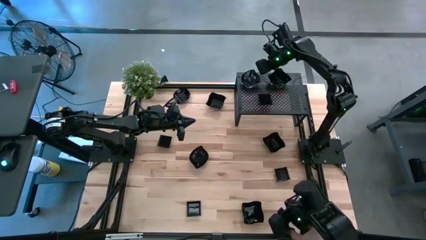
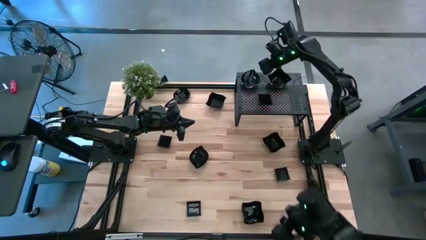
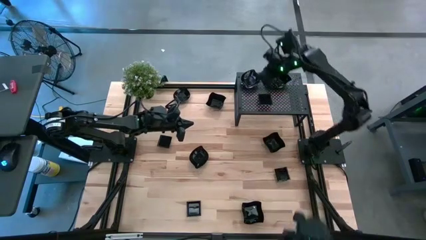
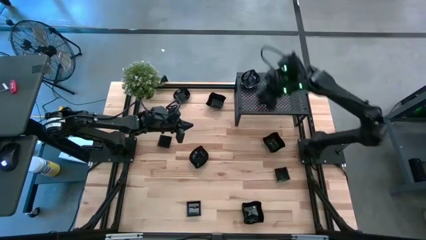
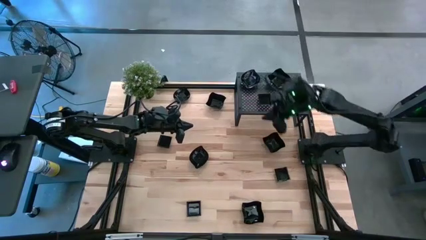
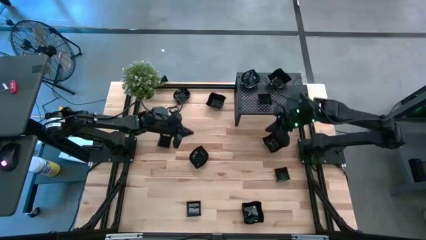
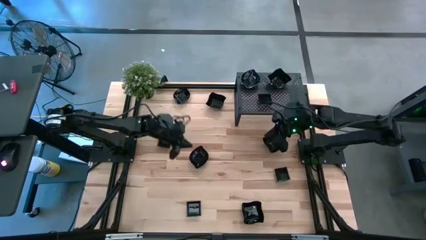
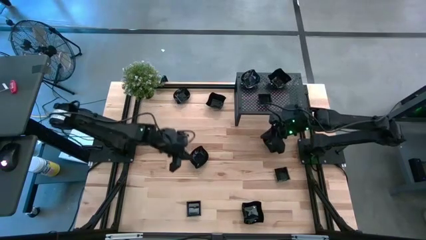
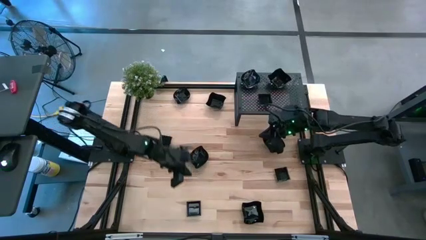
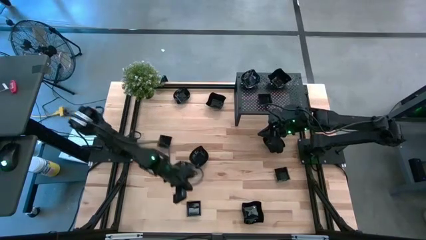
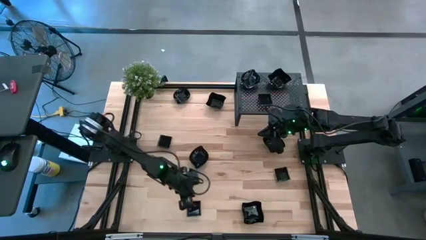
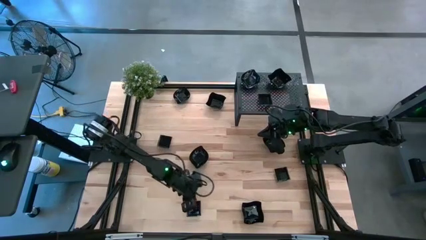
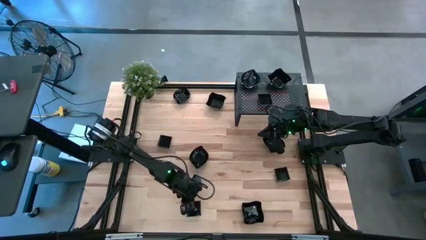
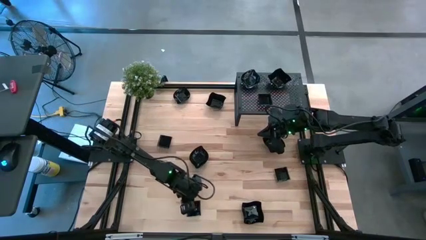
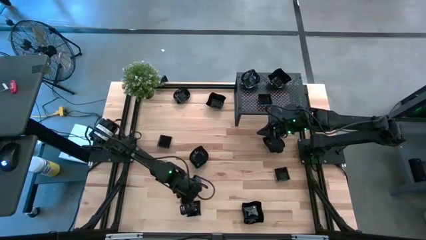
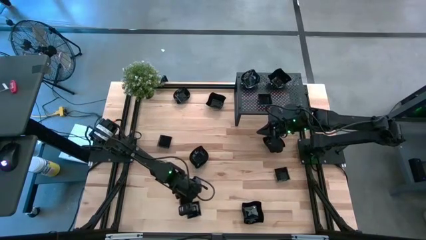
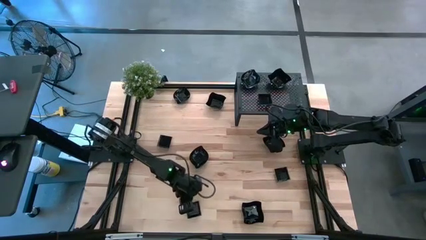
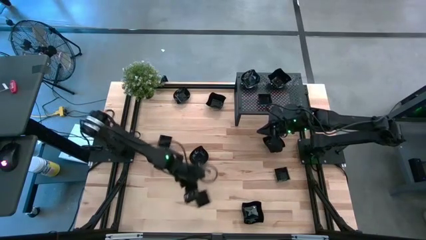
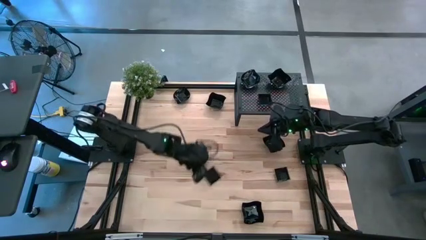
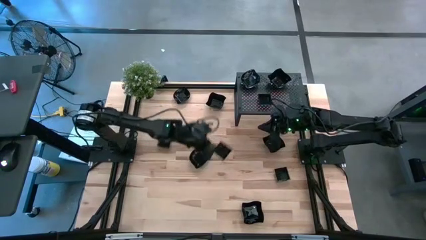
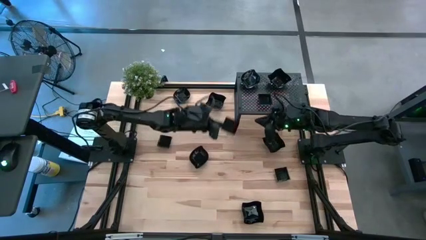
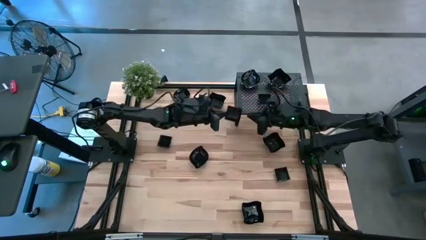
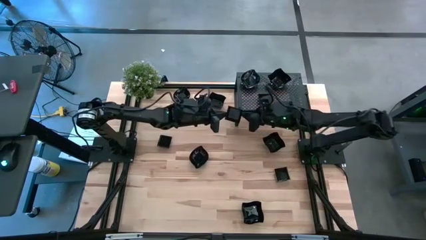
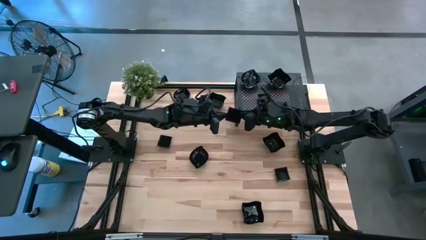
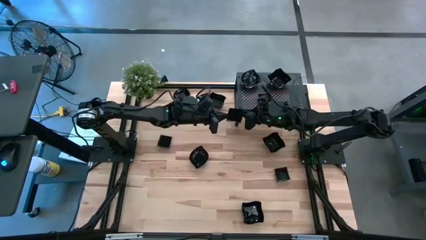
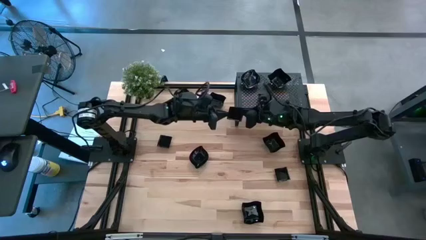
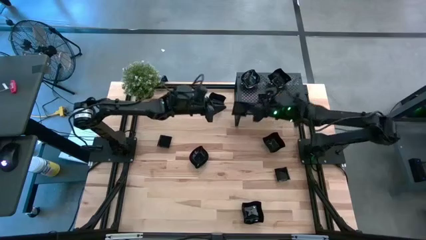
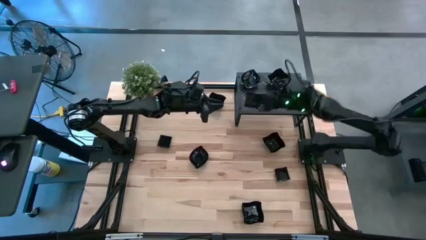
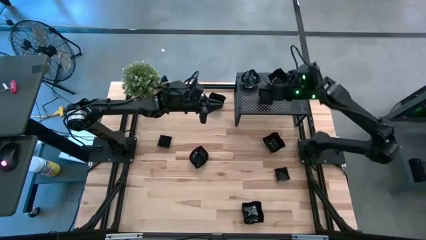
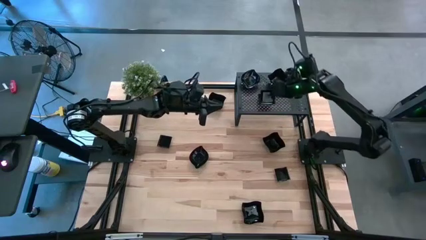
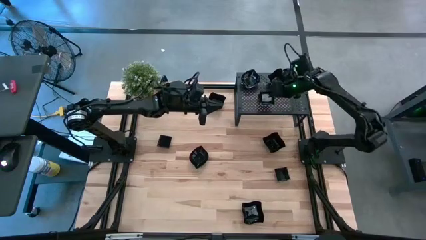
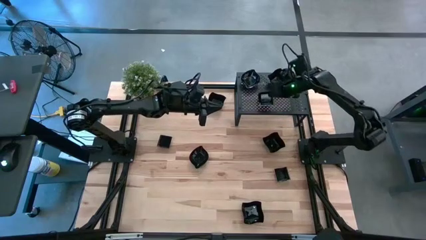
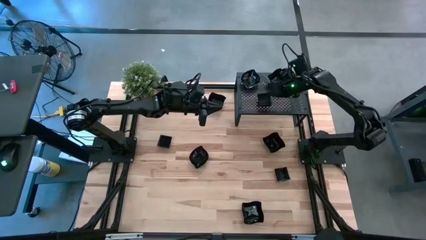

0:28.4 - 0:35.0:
Task: Pick & Place Mini shaped plates
Stack the black square plate on top of the black square plate on the shelf

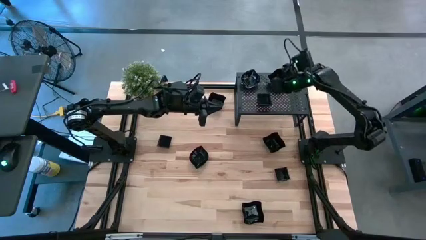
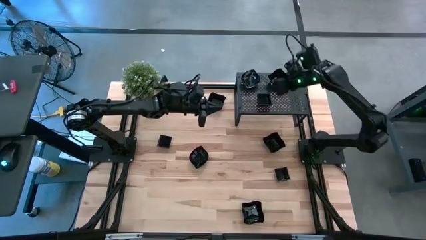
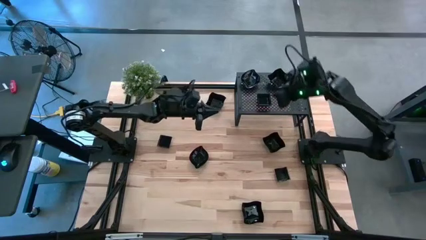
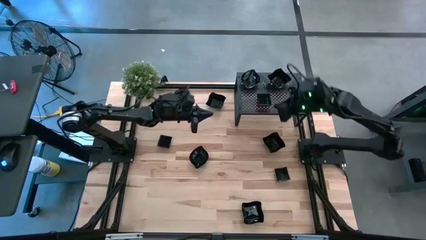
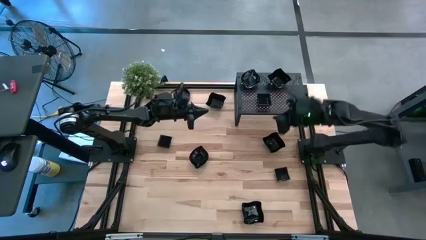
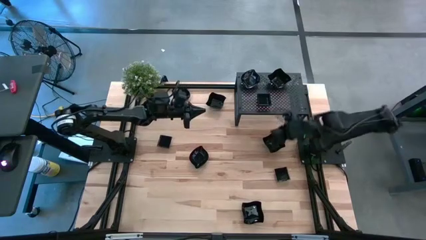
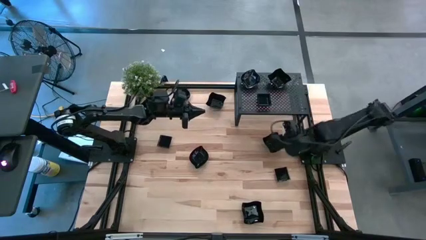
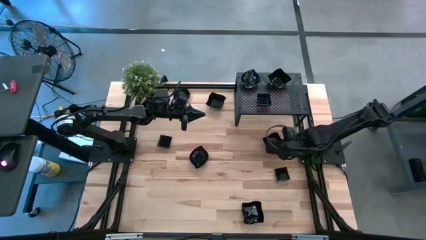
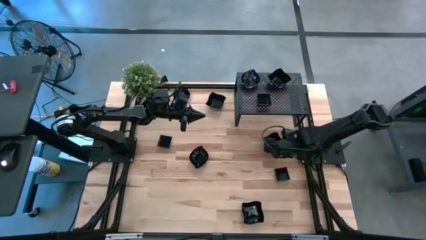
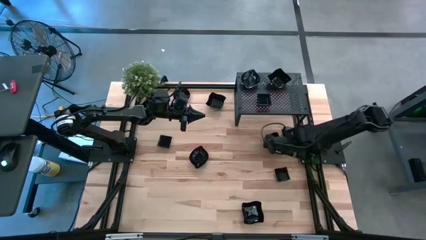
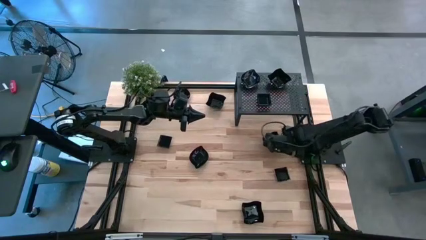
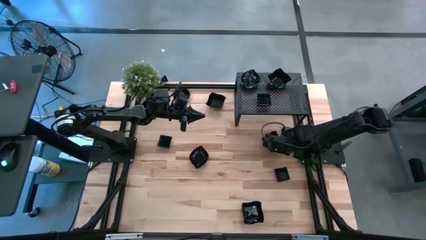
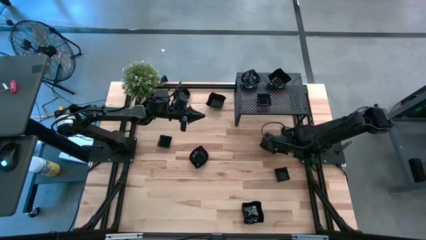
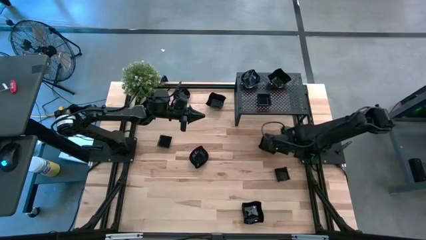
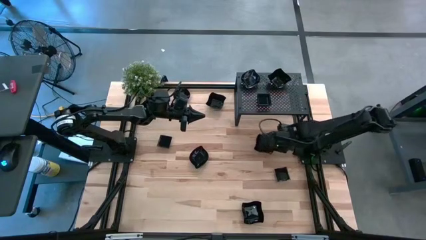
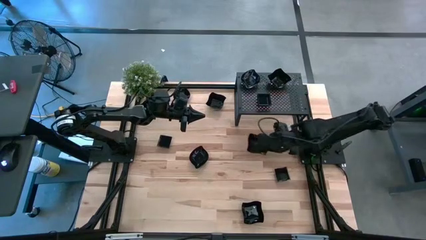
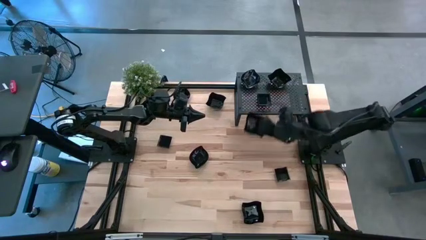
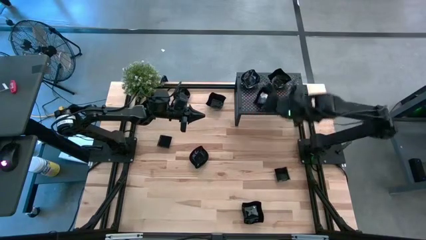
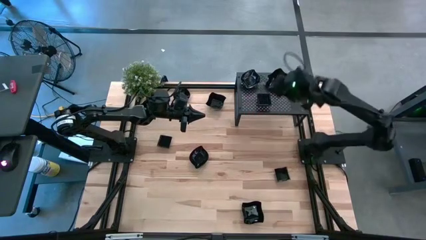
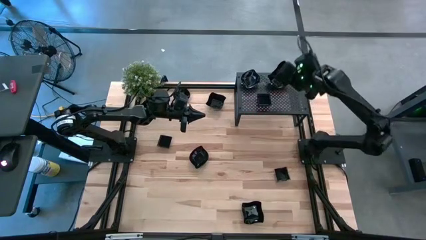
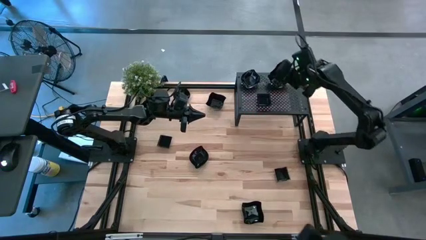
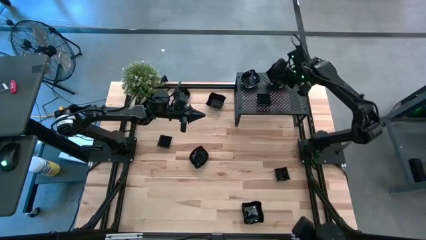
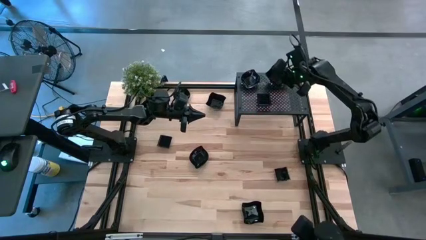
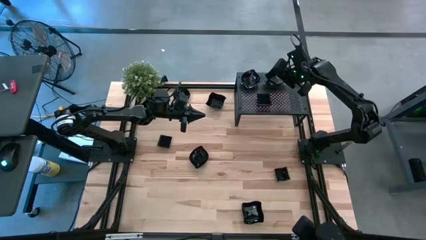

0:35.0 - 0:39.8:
Stack the black distorted square plate on top of the black distorted square plate on the shelf

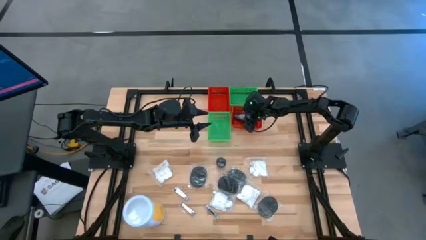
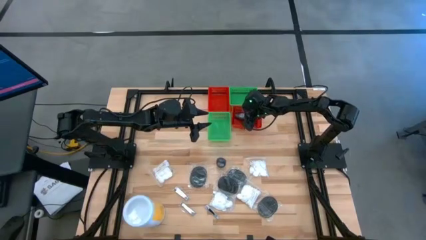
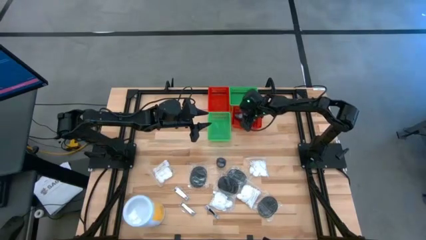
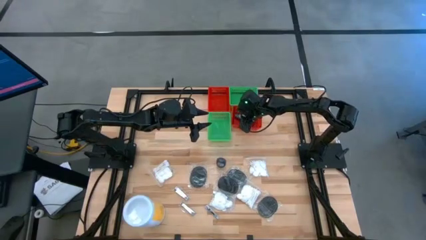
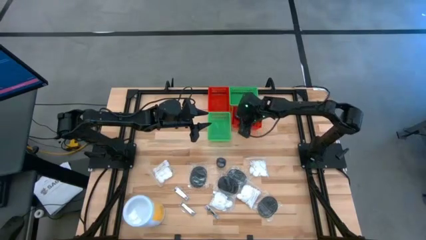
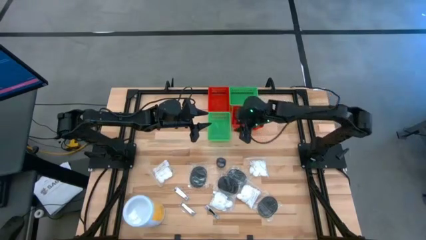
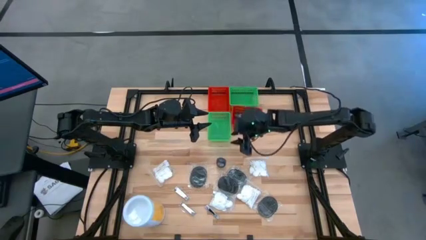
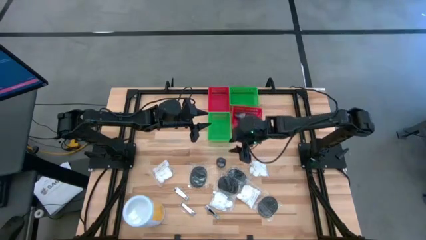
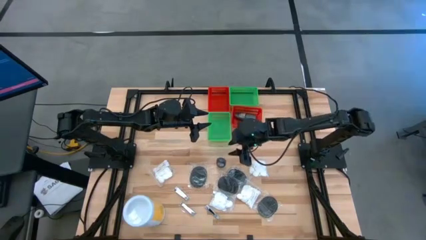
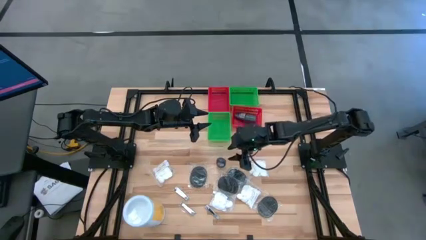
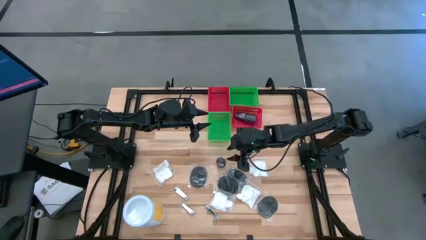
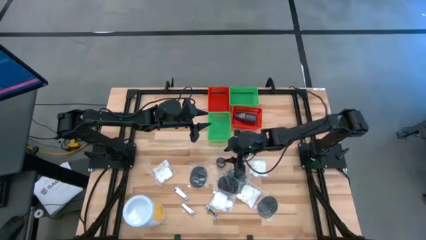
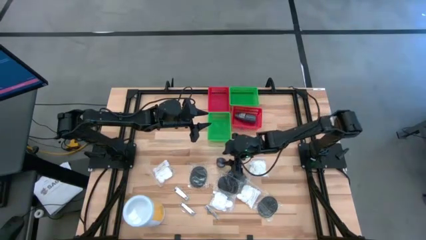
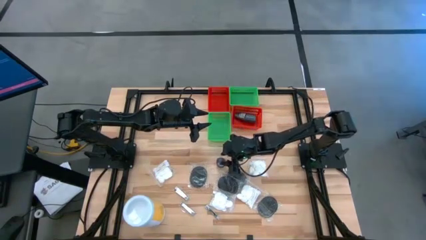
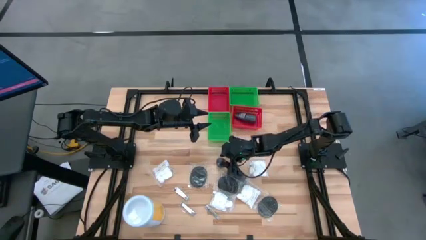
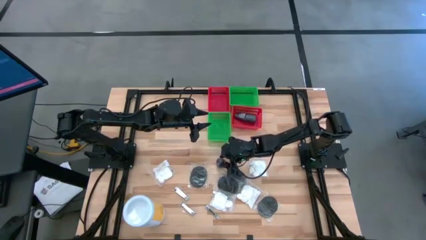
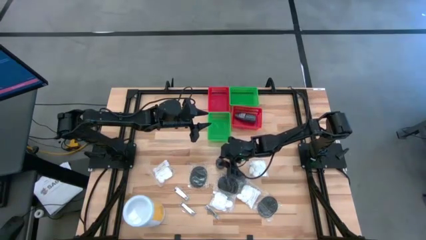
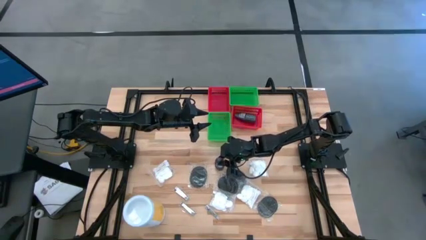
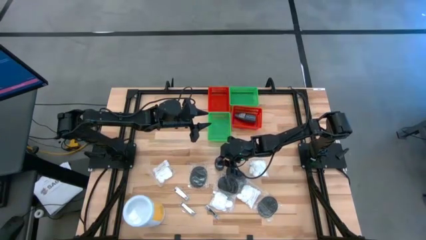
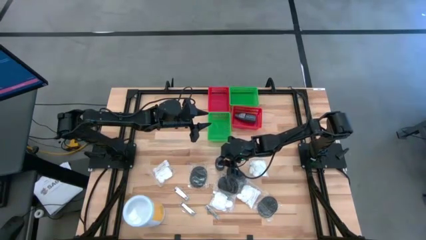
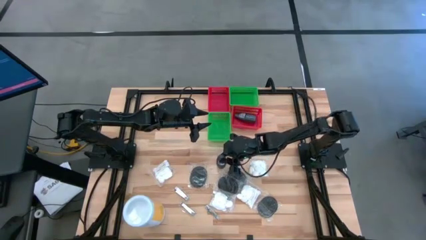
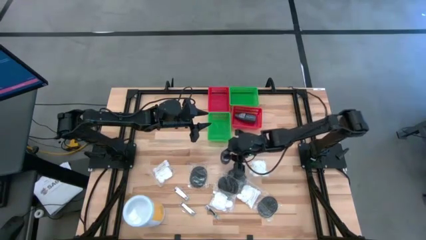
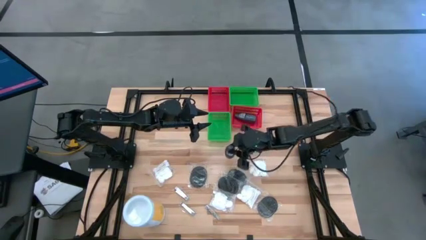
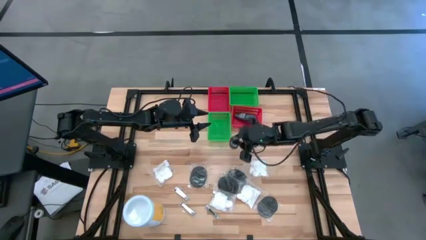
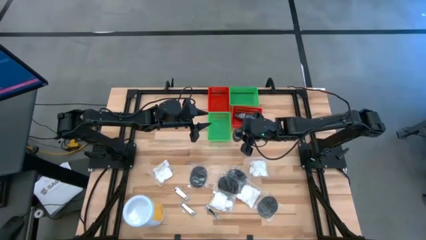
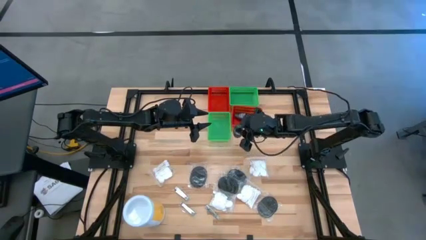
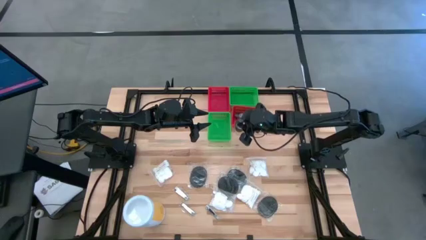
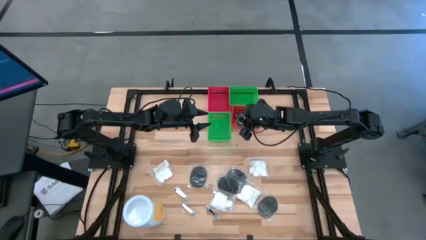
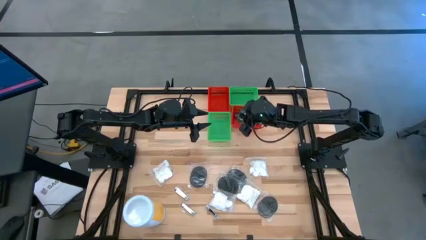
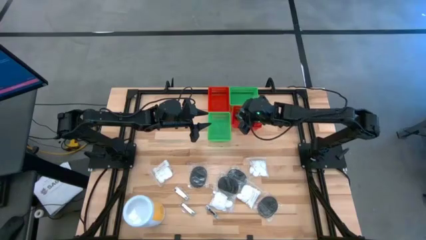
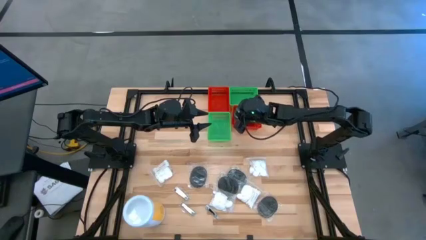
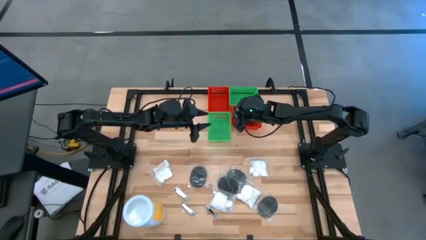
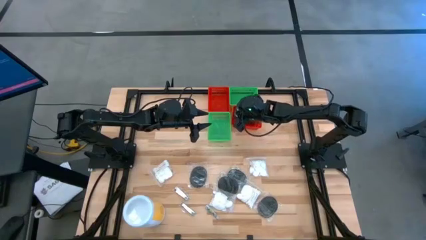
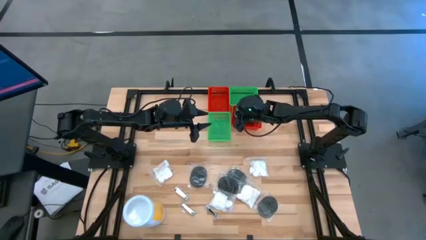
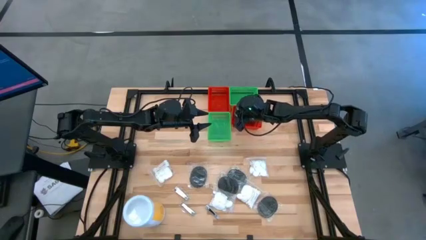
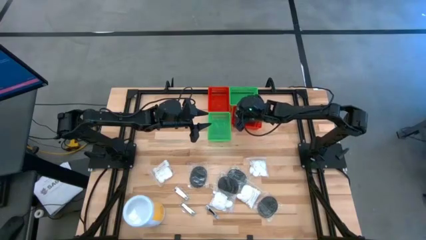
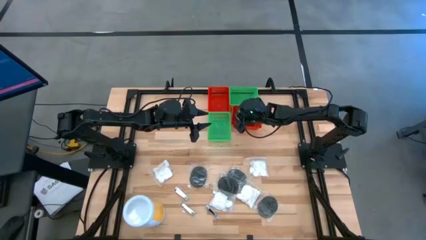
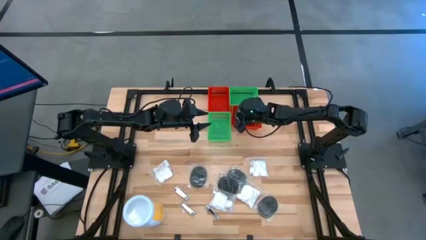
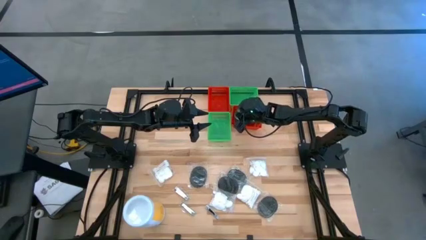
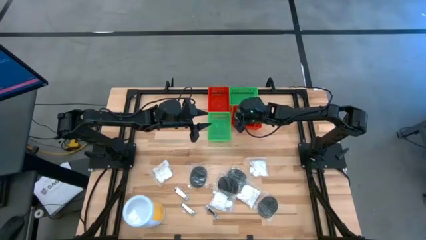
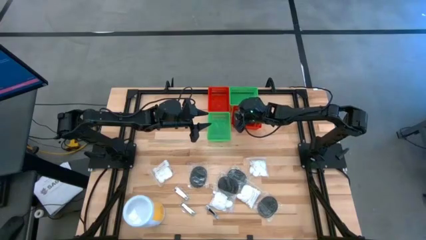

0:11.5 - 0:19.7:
Task: Pick & Place Travel size toiletries
Put the deodorant into the right red bin
